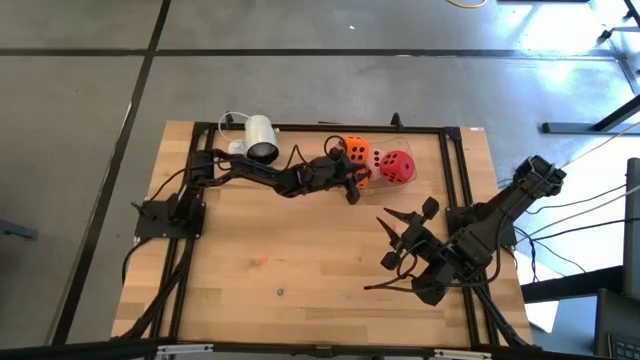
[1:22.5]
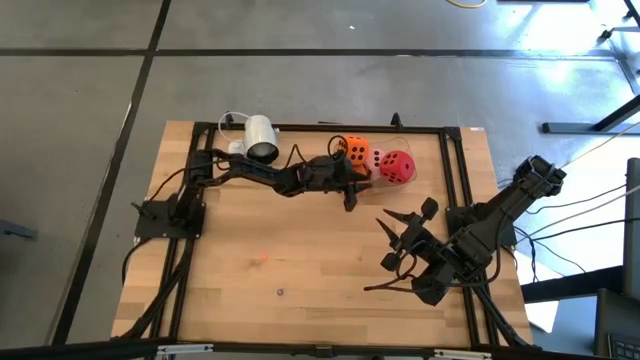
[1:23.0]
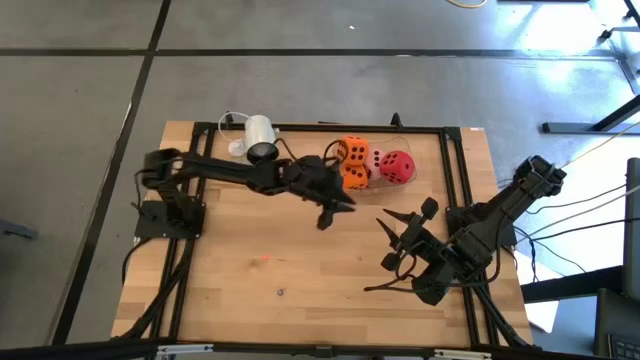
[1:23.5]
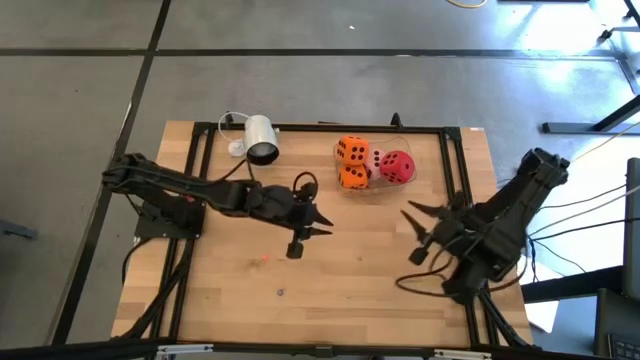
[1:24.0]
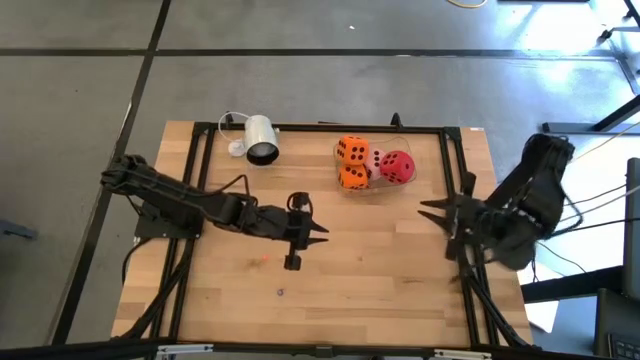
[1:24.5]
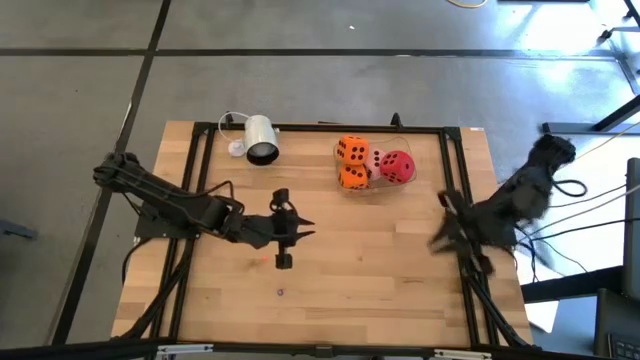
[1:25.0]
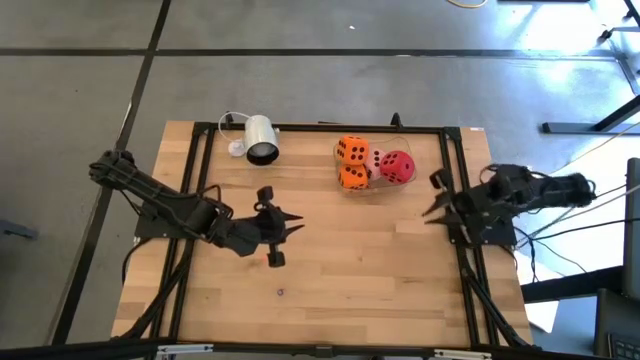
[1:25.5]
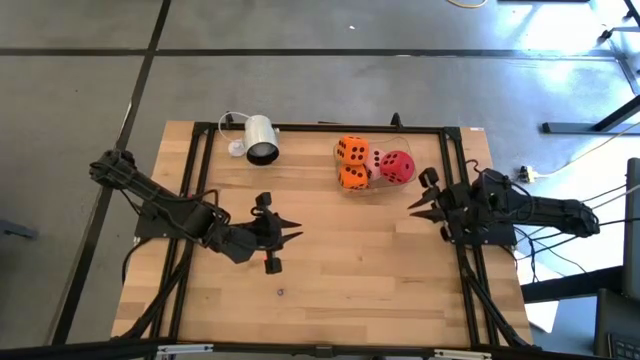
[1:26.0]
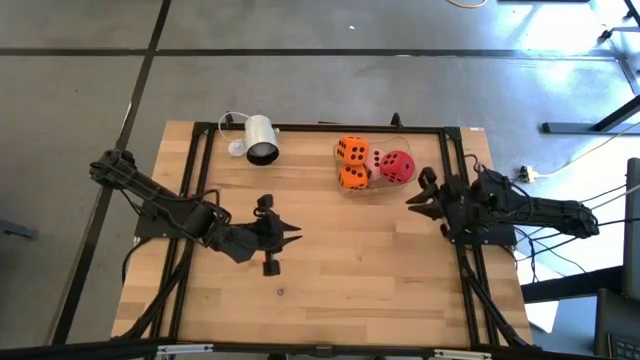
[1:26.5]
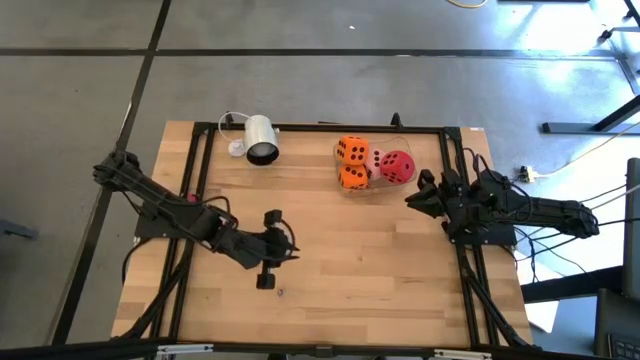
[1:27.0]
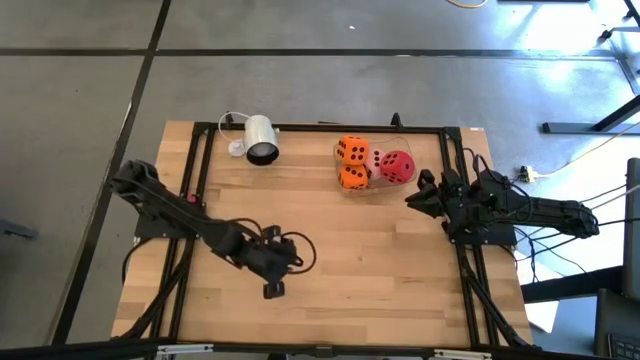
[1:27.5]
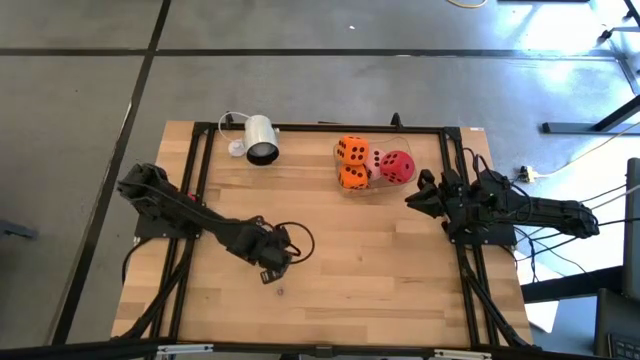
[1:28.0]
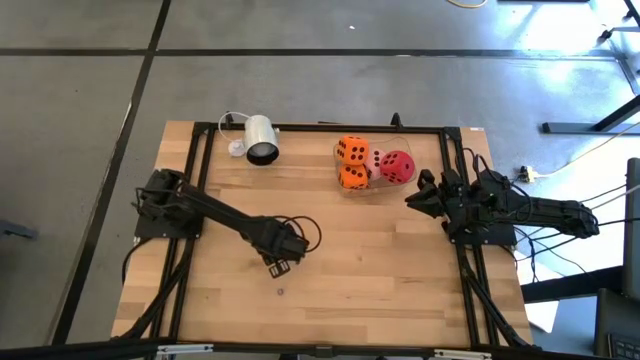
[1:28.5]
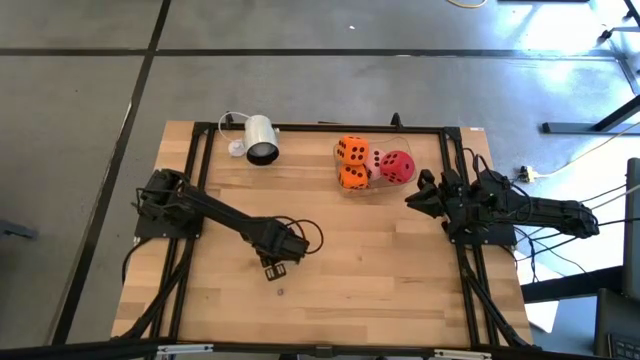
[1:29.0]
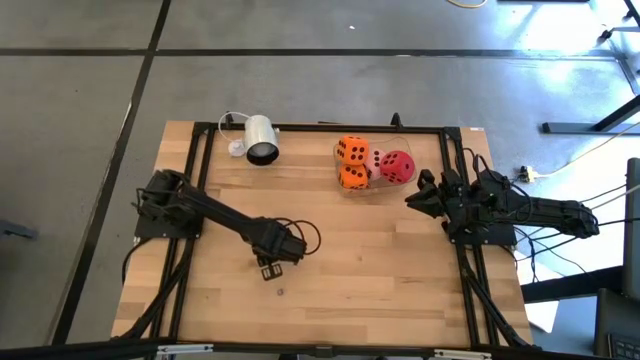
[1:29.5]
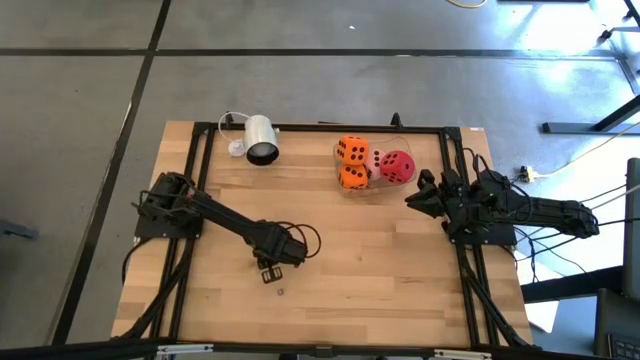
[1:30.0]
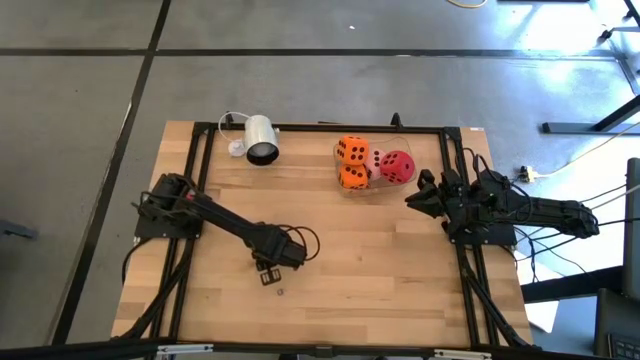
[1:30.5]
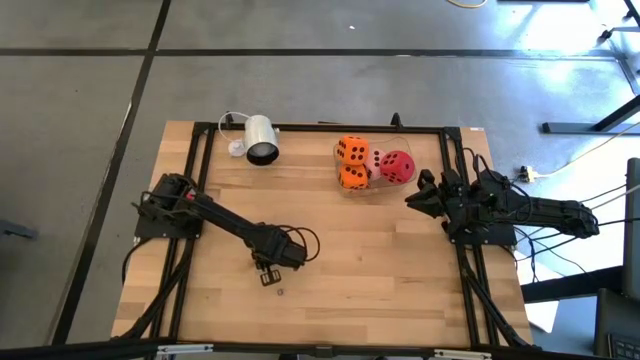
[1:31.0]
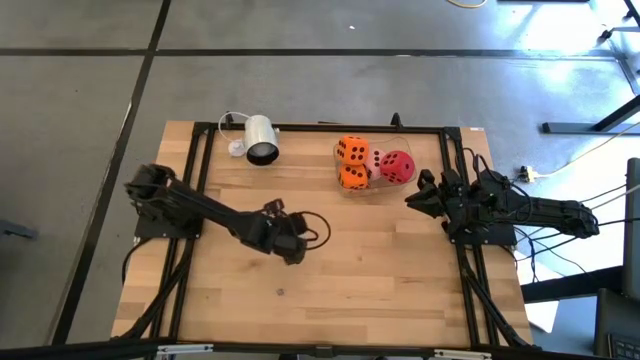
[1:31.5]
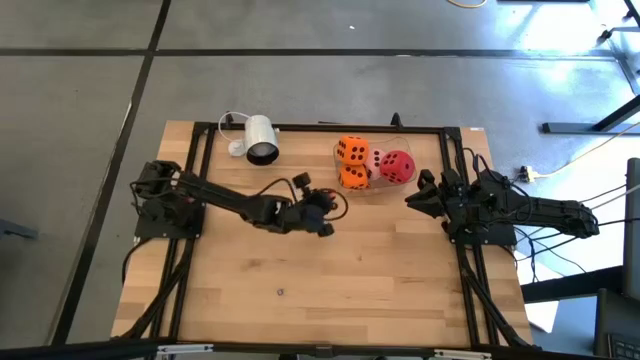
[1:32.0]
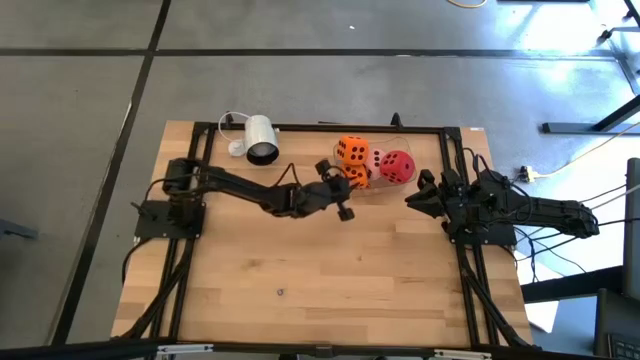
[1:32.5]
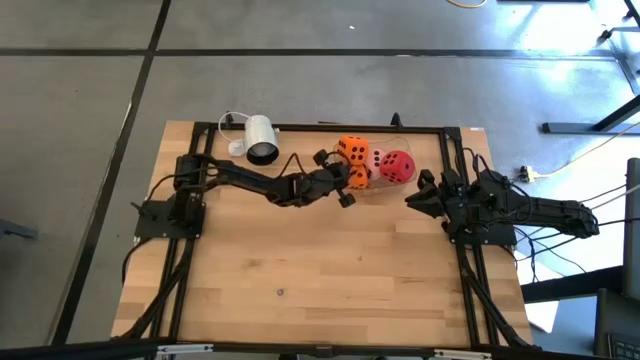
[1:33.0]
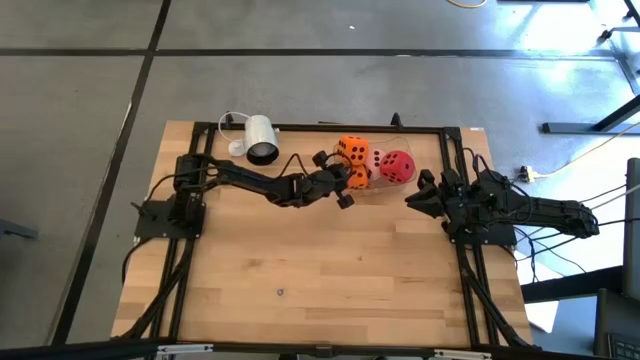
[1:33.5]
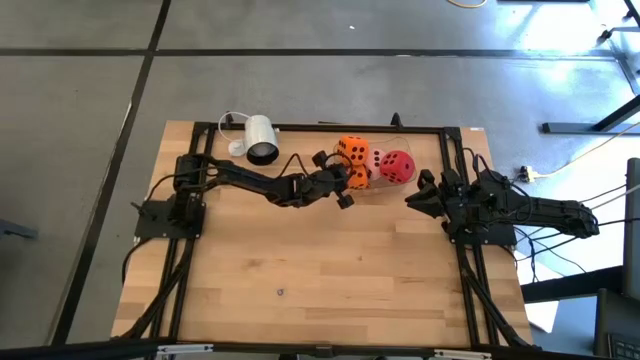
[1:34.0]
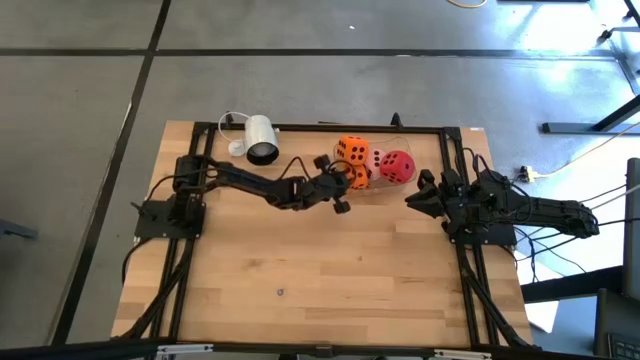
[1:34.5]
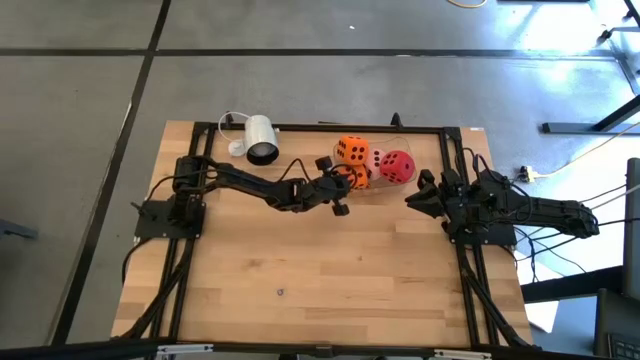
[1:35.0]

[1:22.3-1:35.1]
Task: Pick & Place Dice
Put the small orange die into the transparent bin

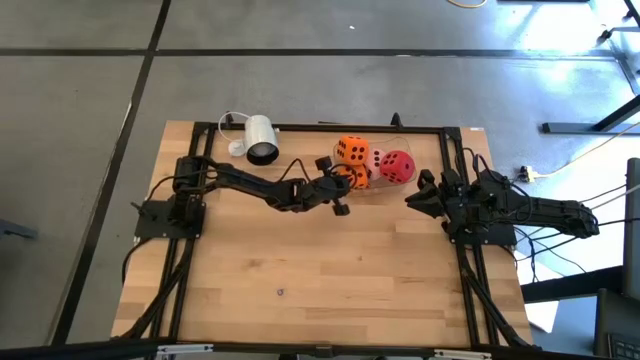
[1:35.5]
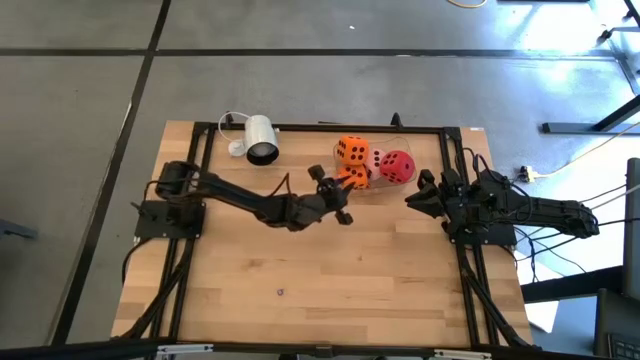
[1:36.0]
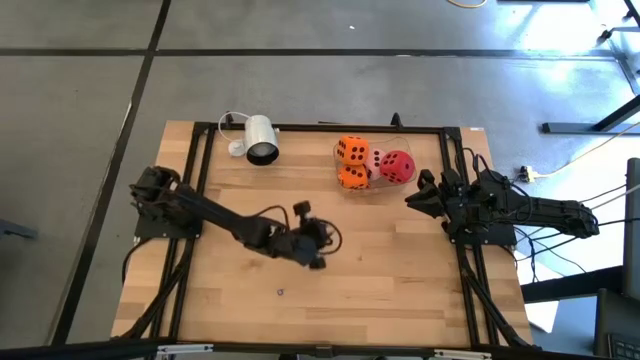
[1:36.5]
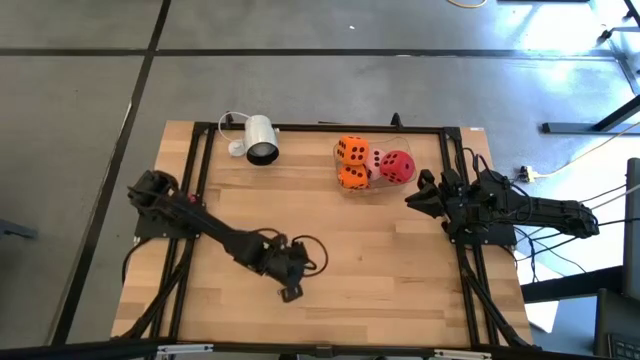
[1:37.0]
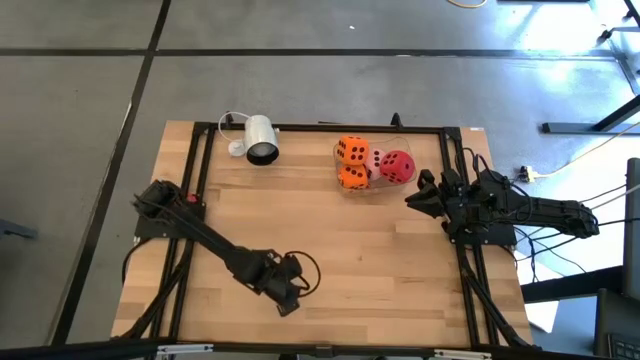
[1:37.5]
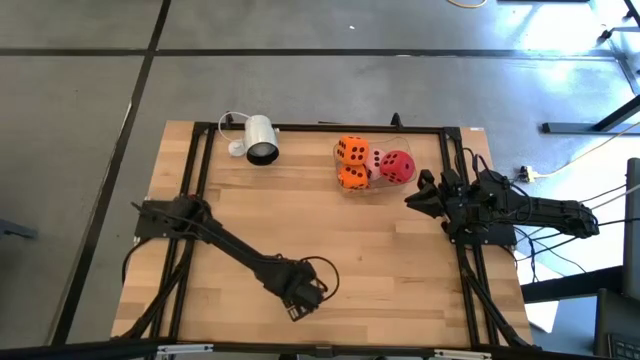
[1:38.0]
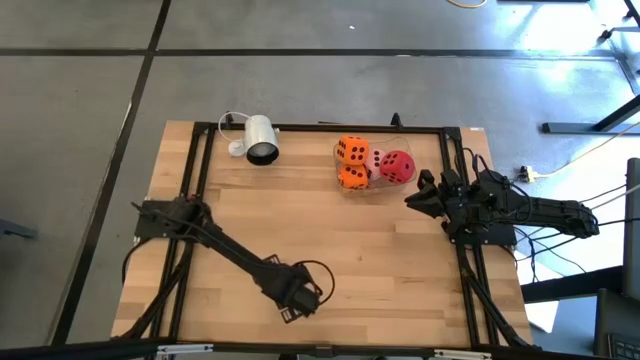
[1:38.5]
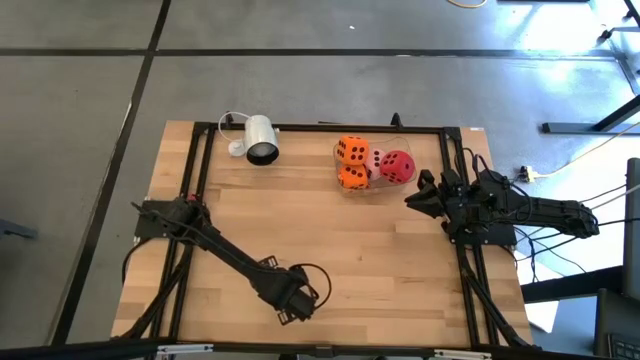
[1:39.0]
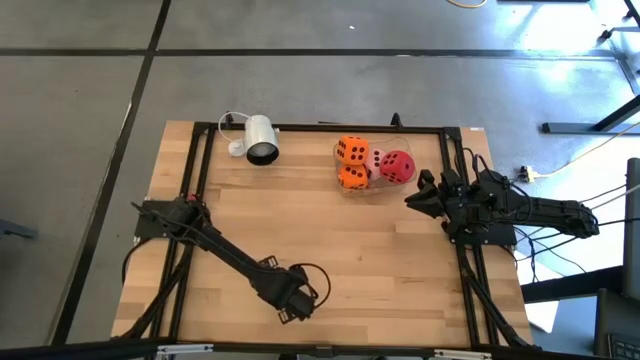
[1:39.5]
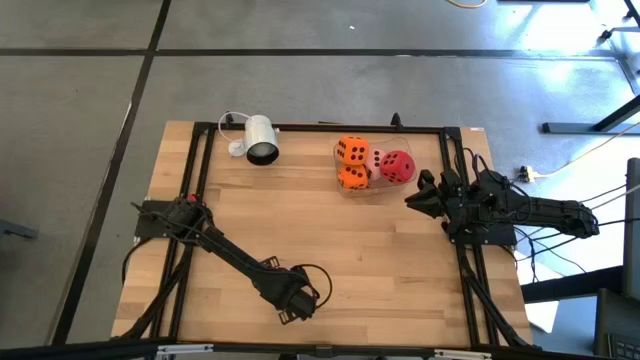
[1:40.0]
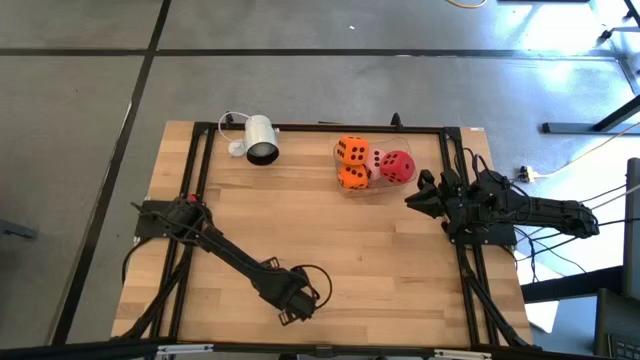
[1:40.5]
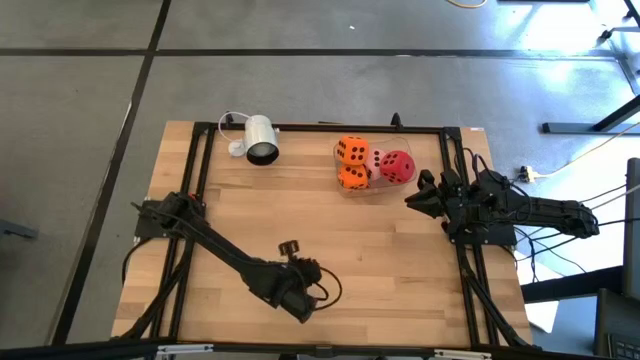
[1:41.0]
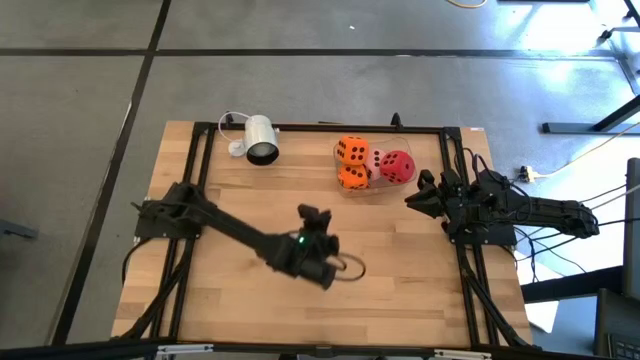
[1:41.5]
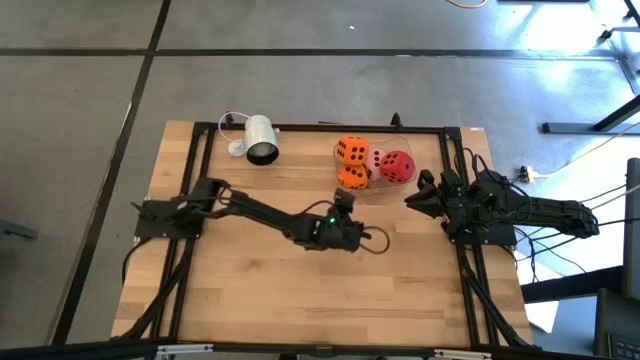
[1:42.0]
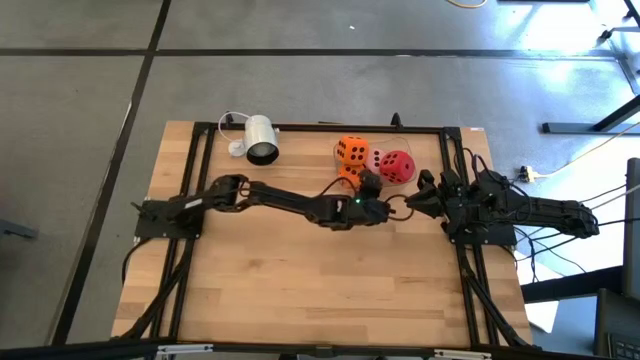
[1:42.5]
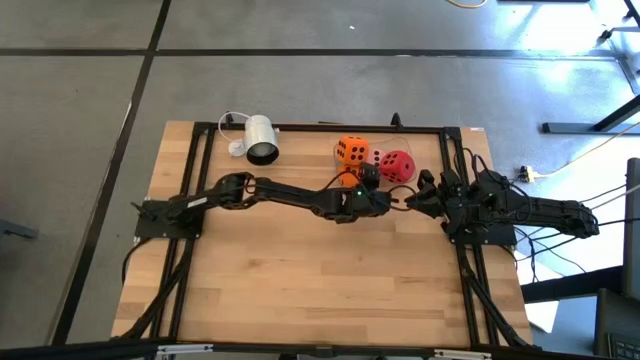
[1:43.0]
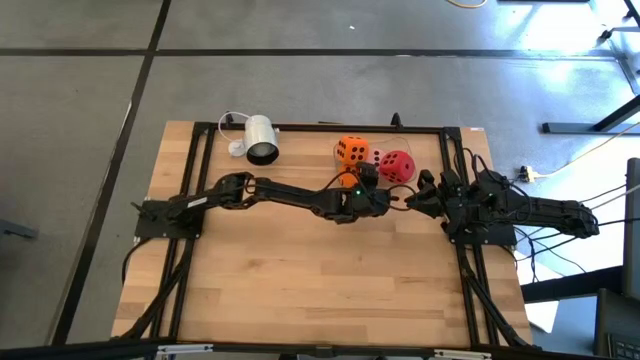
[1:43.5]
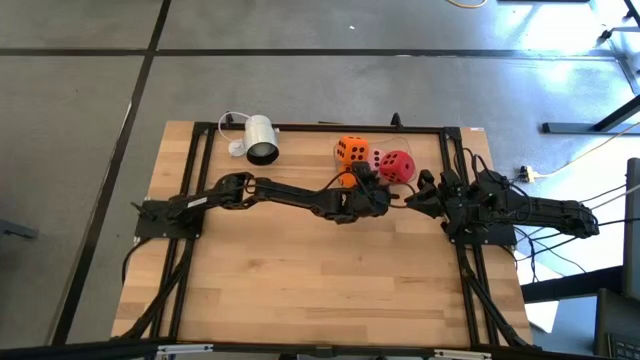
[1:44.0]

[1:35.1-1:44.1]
Put the small blue die into the transparent bin
